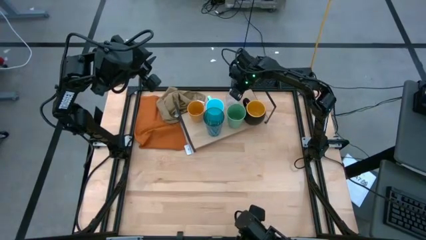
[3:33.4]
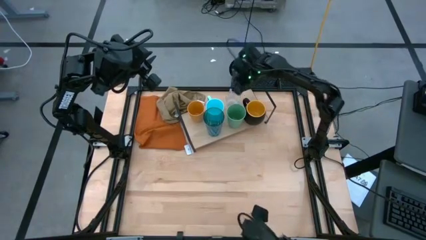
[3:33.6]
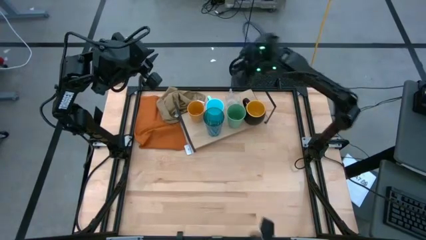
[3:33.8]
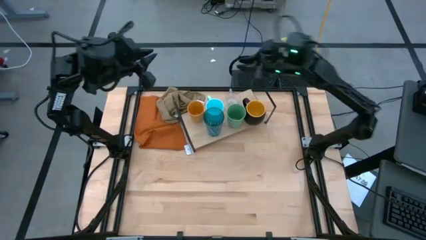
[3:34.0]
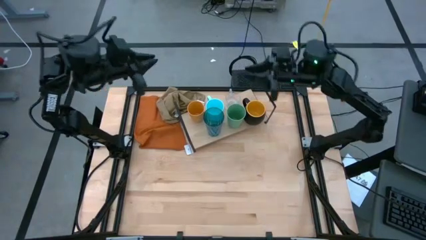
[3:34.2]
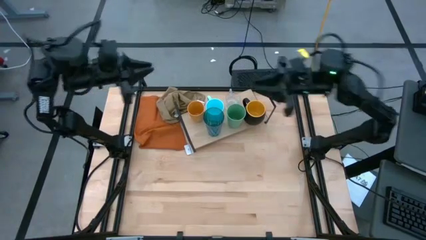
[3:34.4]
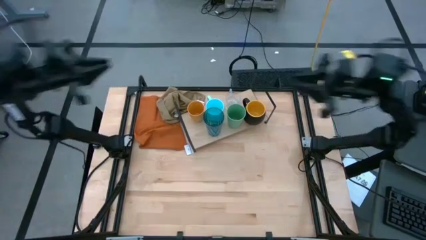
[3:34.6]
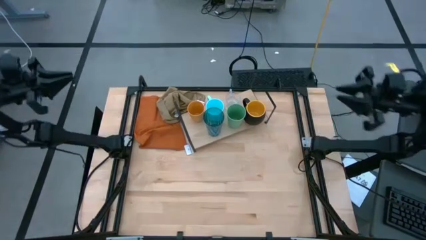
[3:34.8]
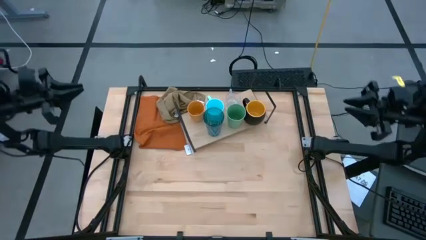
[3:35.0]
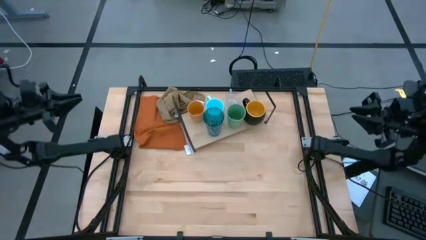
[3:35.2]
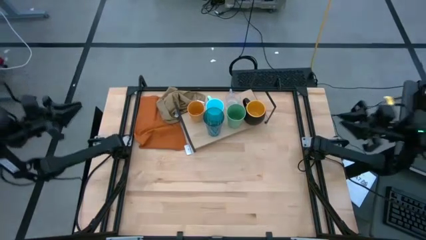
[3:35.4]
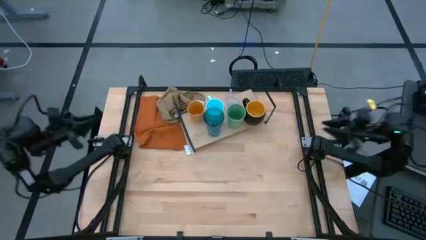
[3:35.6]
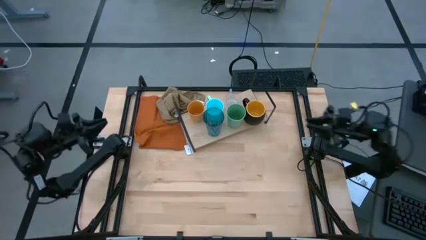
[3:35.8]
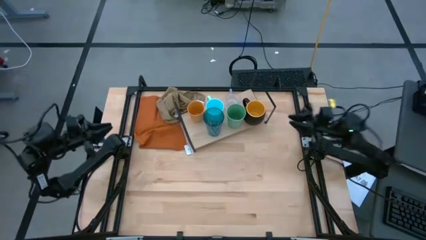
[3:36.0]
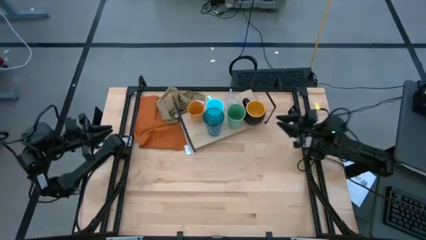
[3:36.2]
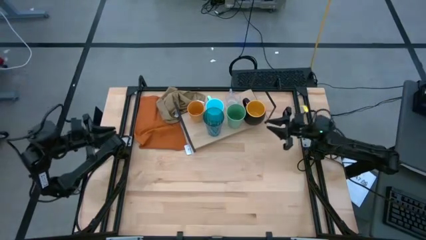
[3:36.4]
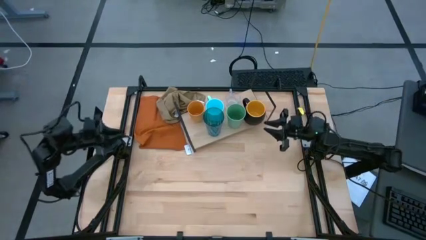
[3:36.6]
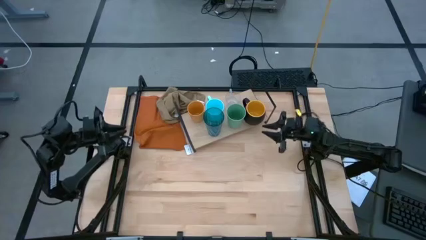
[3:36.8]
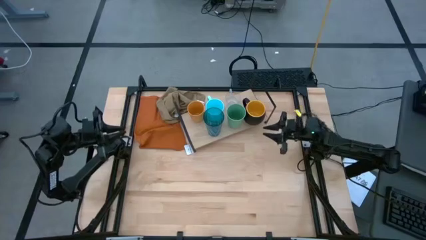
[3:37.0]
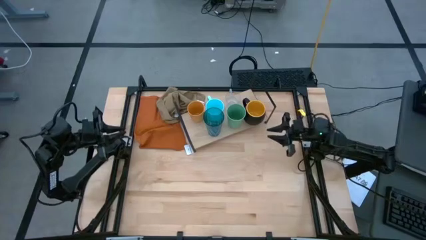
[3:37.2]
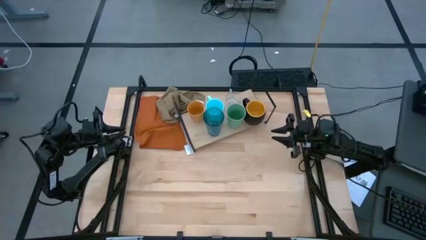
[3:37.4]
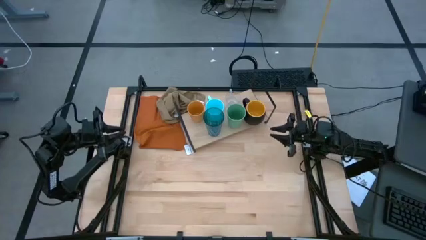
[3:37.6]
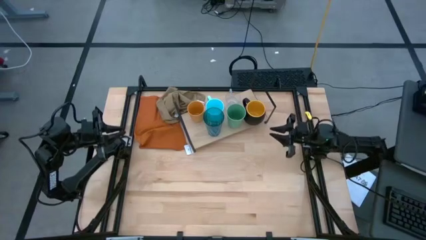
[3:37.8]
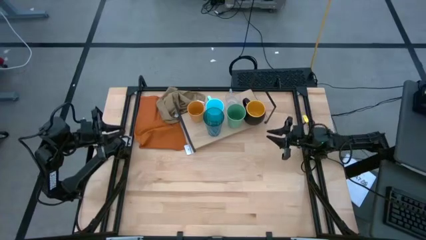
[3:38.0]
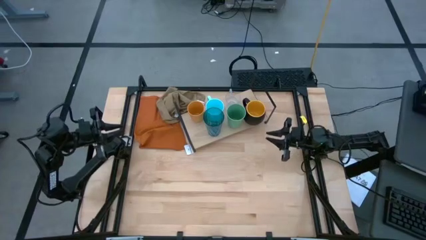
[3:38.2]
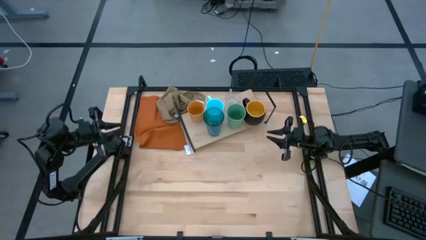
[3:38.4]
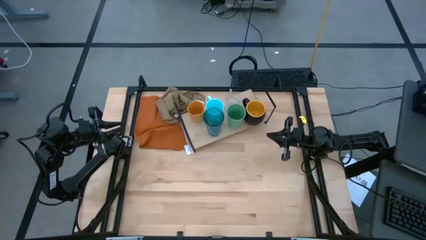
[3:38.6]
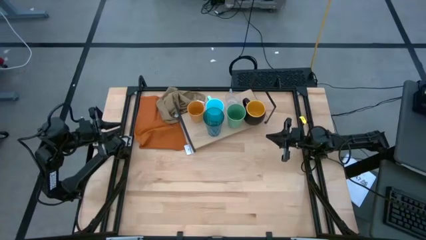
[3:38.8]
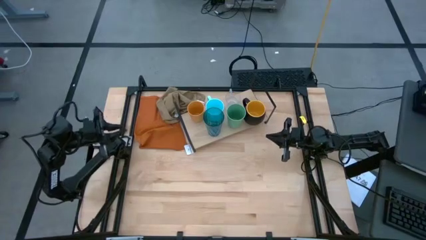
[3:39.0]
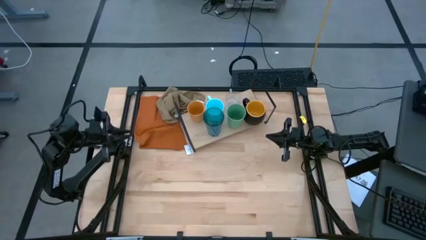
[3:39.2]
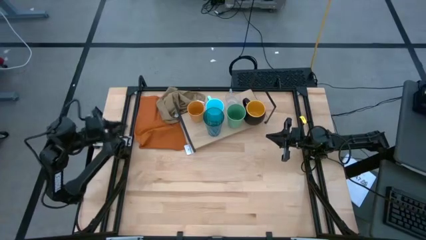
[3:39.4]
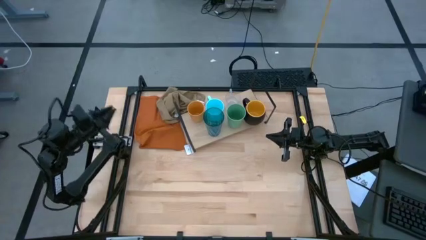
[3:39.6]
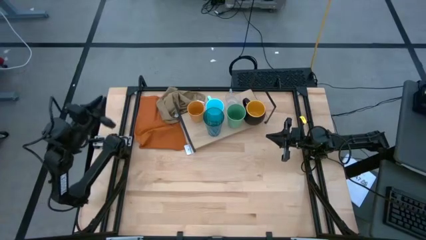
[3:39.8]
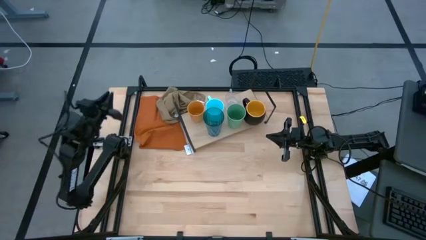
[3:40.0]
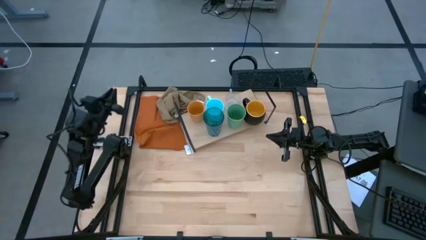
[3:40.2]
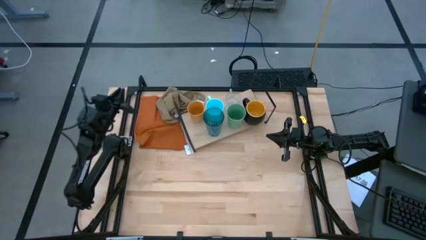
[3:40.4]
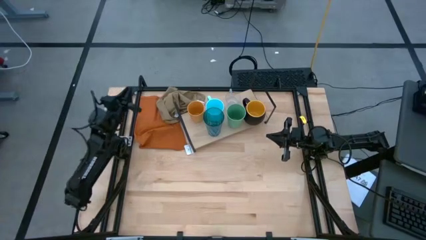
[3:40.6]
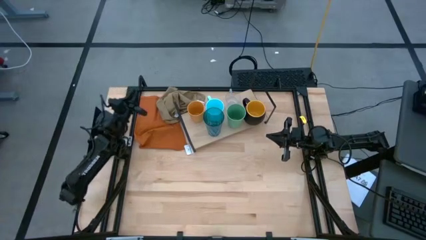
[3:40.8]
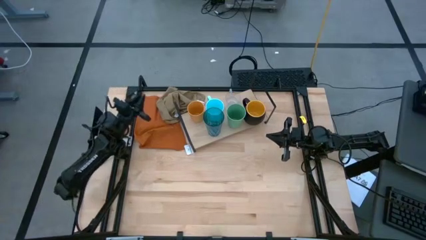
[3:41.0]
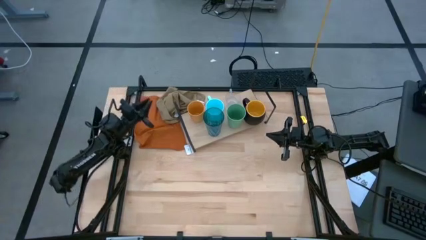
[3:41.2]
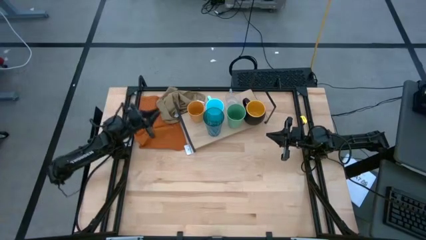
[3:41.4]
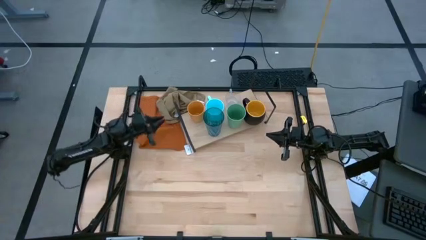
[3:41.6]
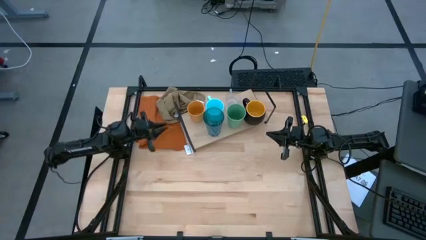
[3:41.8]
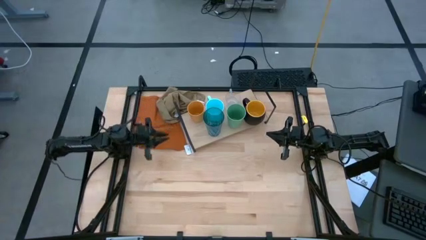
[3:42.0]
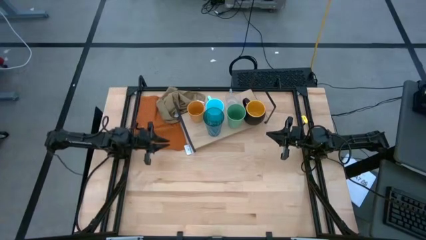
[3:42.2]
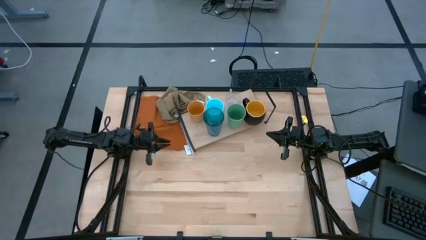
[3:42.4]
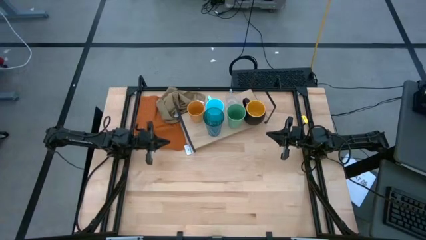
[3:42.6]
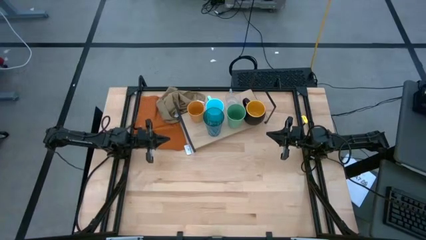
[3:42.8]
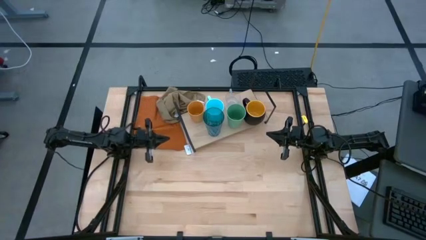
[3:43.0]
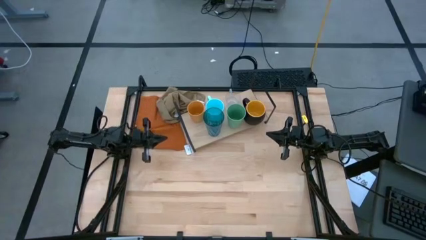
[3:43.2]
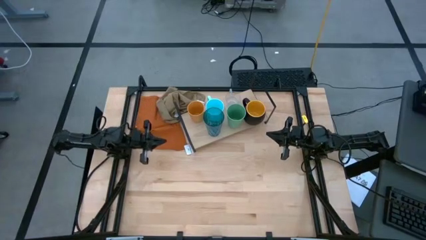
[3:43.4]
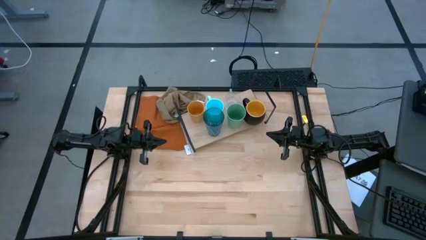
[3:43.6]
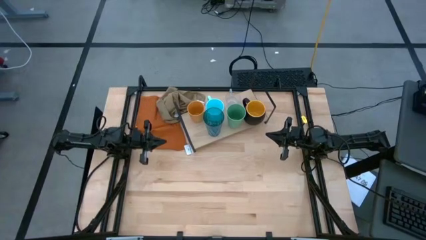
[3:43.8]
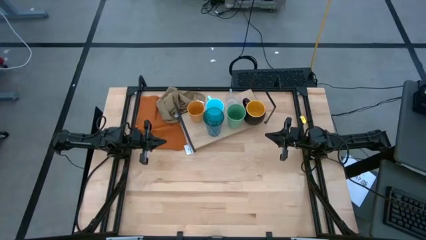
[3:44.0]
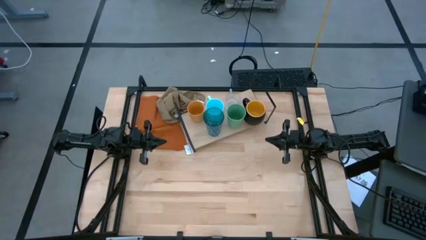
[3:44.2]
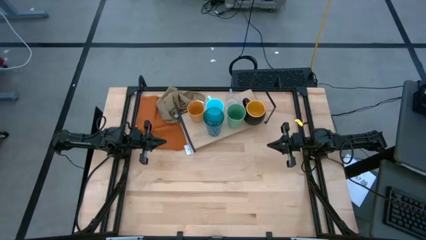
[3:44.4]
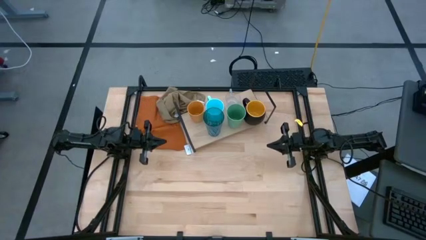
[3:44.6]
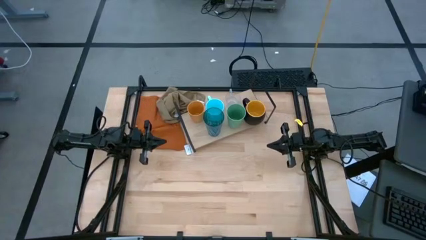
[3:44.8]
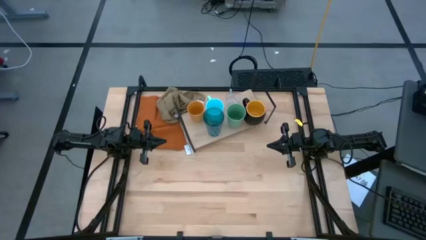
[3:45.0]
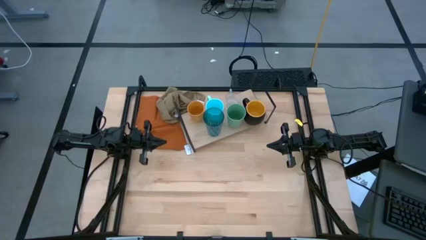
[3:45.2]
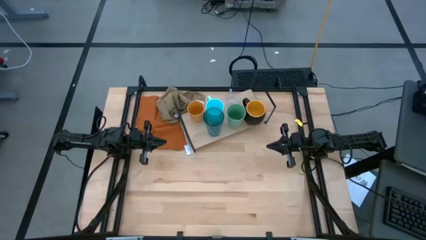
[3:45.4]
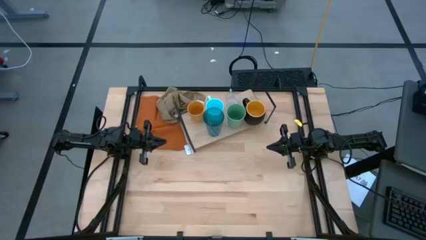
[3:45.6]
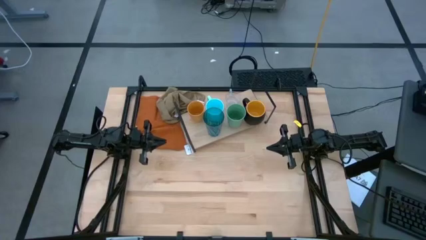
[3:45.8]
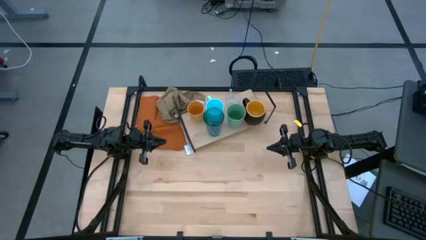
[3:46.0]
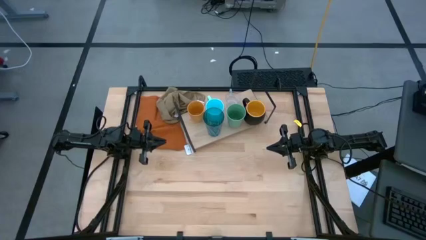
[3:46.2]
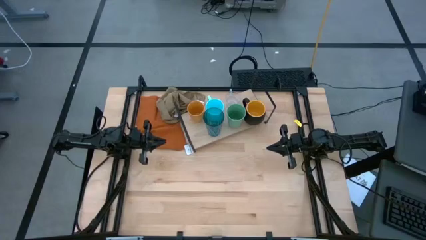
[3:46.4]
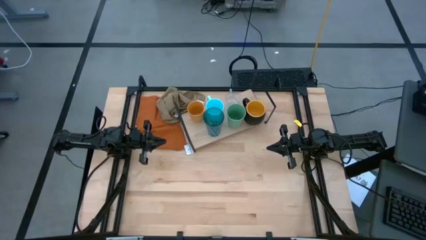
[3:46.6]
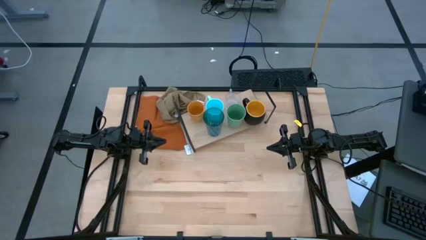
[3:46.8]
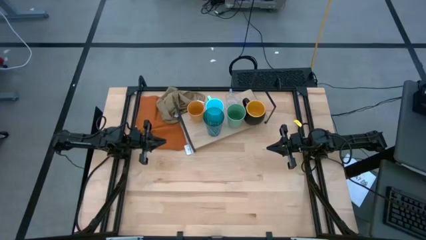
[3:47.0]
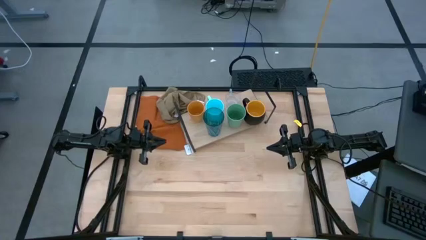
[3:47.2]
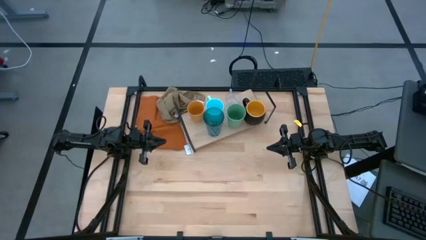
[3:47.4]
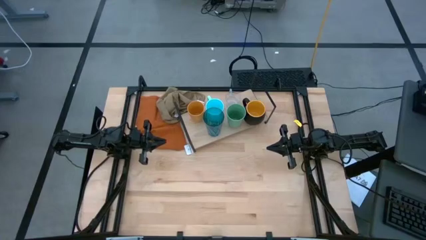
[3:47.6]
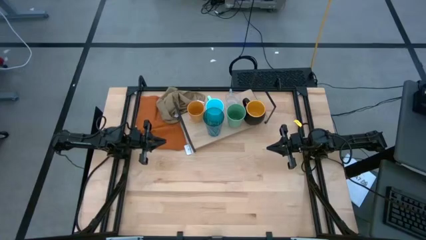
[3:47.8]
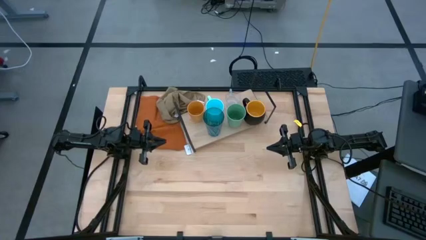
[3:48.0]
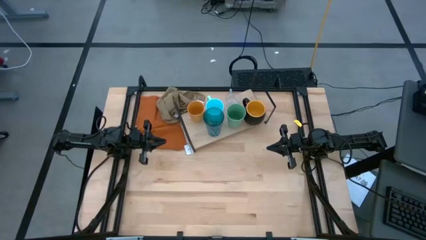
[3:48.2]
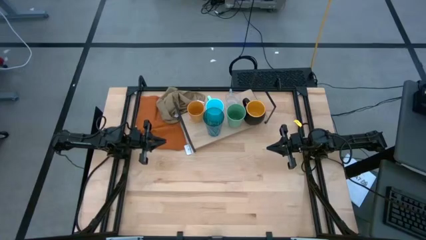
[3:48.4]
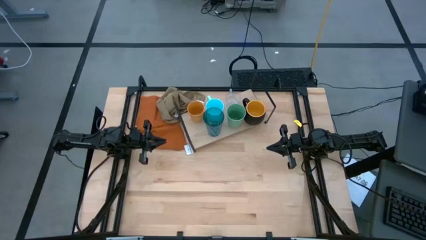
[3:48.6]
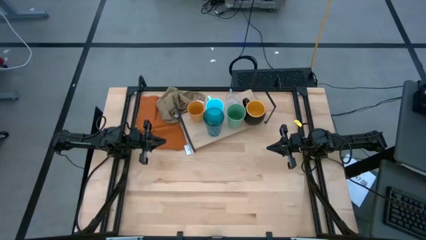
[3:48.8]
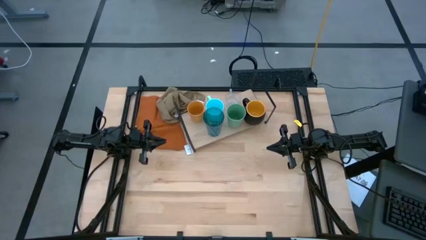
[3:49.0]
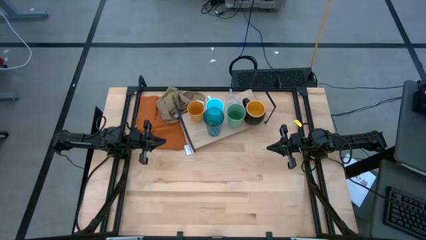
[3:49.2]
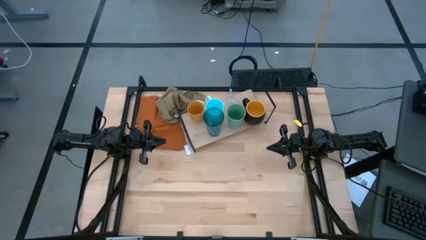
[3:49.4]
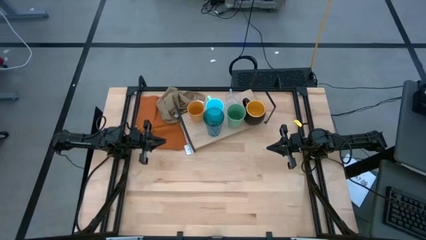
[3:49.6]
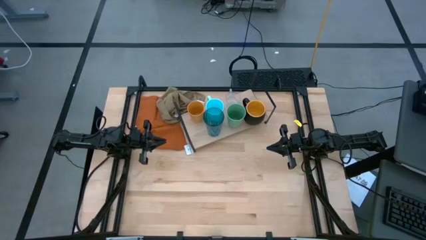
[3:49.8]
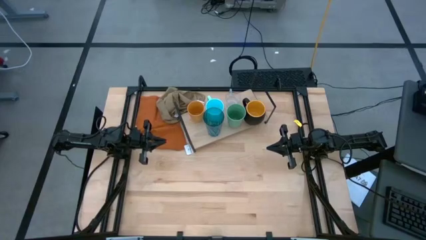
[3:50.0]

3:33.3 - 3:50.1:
Task: Stack small to large cups/mugs on shelf
Return to Home Position
